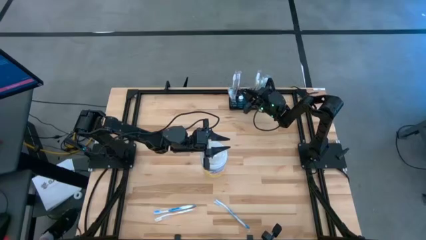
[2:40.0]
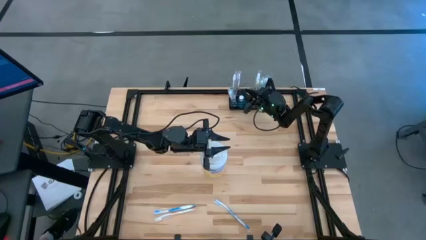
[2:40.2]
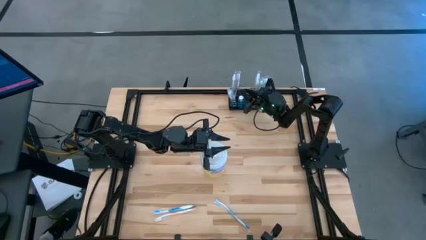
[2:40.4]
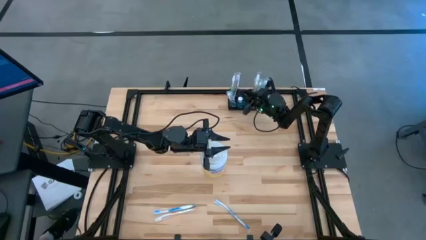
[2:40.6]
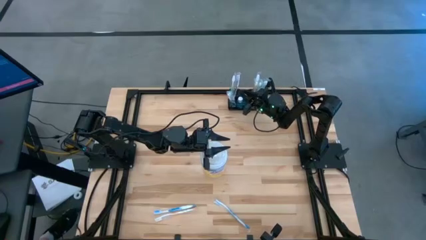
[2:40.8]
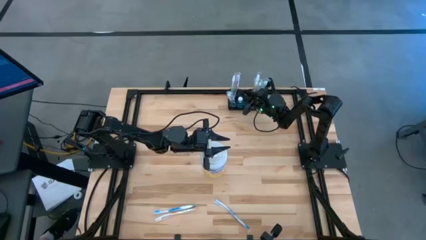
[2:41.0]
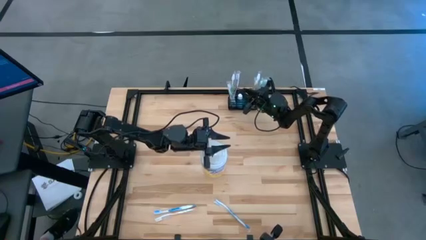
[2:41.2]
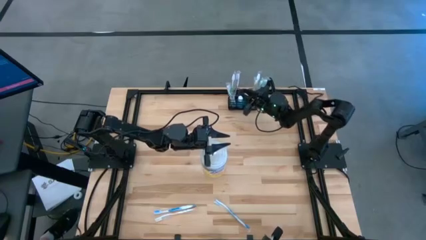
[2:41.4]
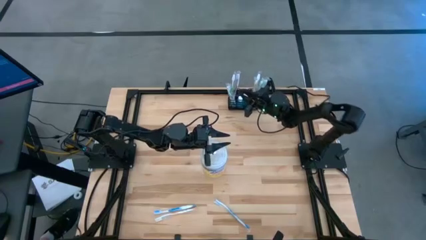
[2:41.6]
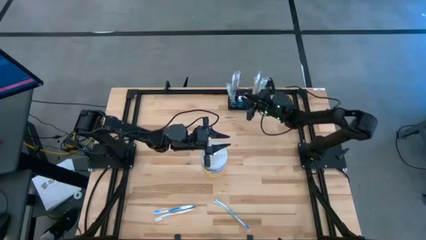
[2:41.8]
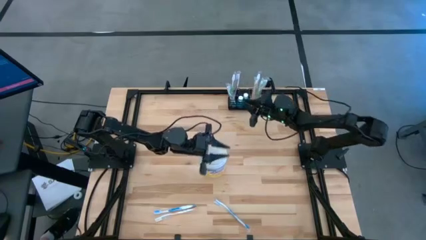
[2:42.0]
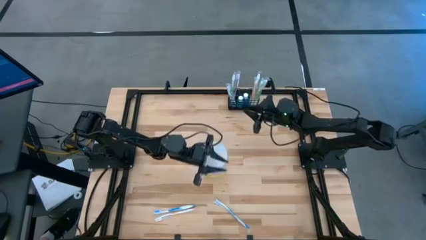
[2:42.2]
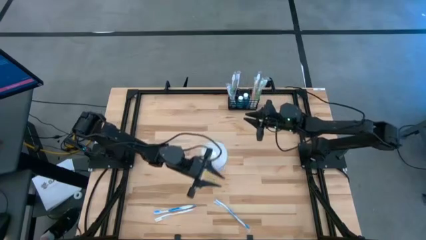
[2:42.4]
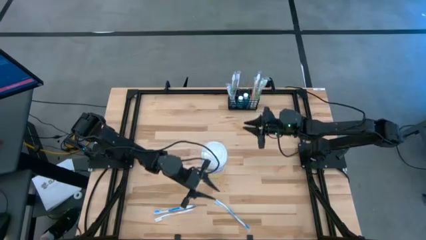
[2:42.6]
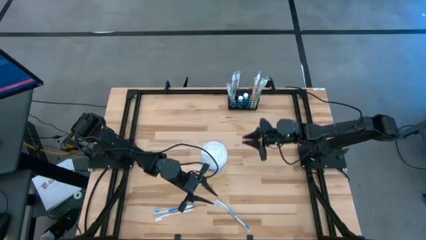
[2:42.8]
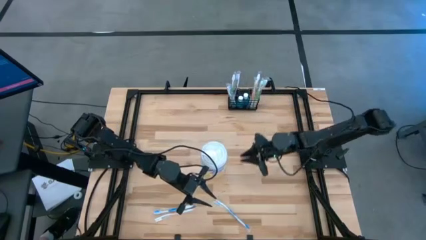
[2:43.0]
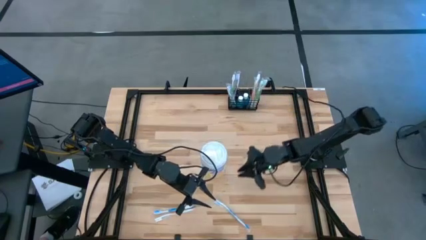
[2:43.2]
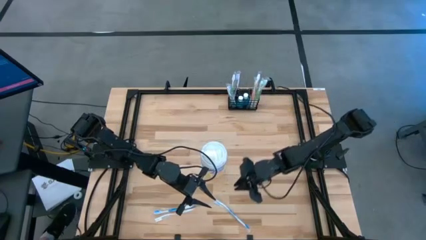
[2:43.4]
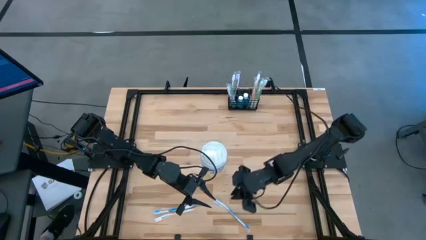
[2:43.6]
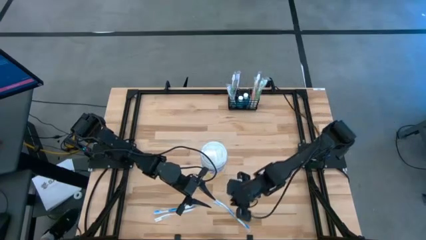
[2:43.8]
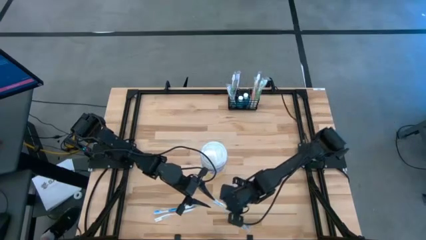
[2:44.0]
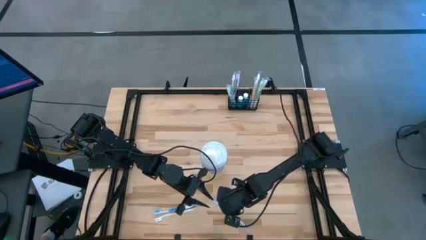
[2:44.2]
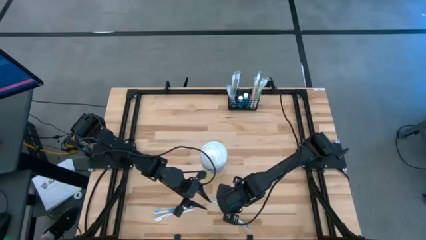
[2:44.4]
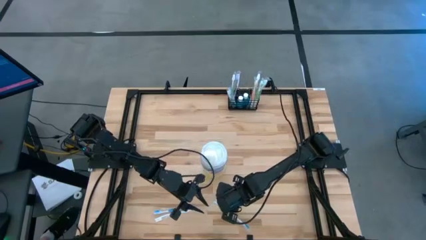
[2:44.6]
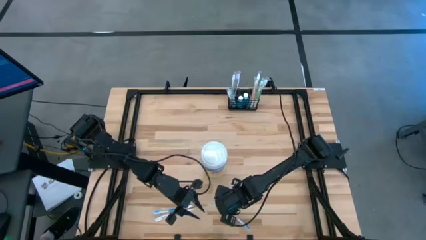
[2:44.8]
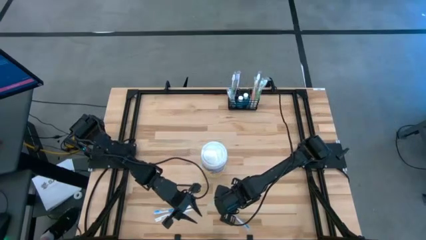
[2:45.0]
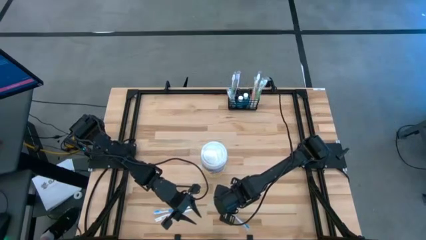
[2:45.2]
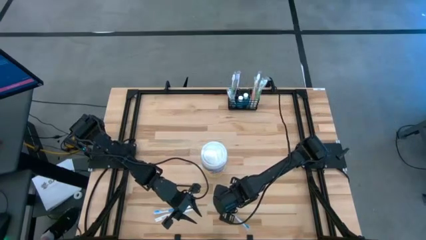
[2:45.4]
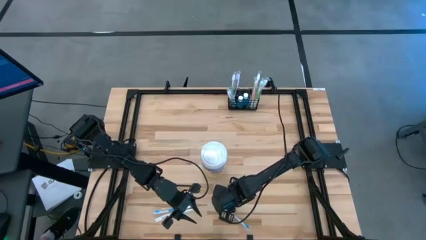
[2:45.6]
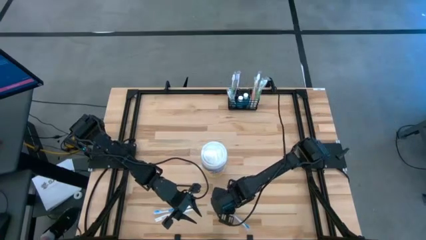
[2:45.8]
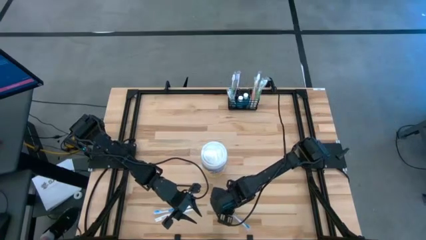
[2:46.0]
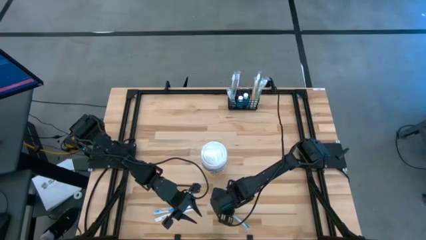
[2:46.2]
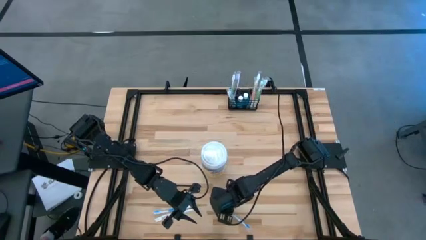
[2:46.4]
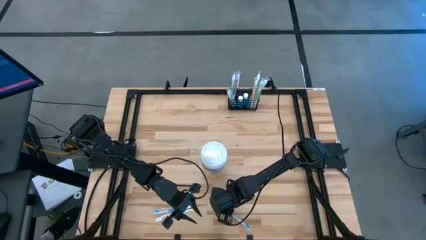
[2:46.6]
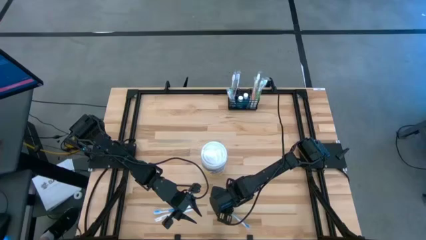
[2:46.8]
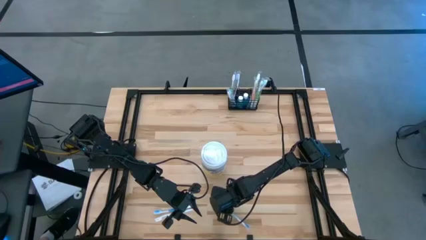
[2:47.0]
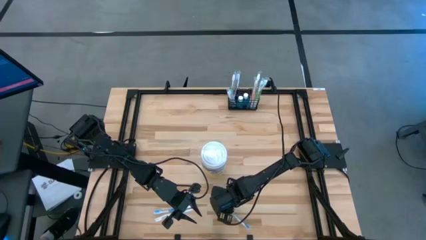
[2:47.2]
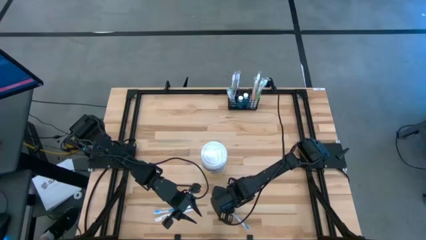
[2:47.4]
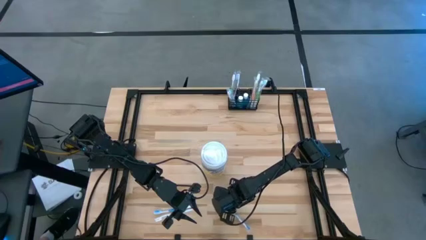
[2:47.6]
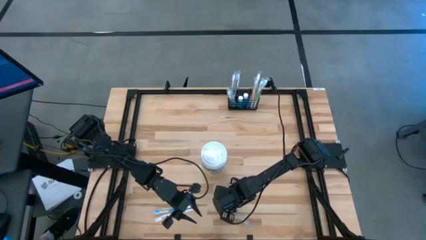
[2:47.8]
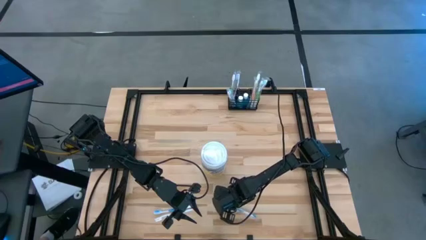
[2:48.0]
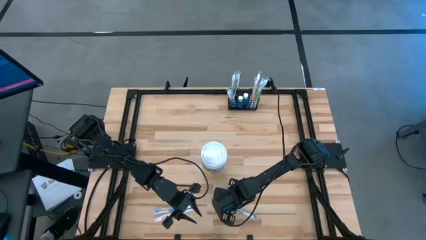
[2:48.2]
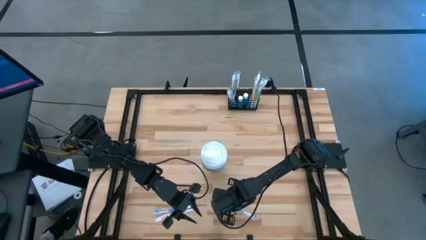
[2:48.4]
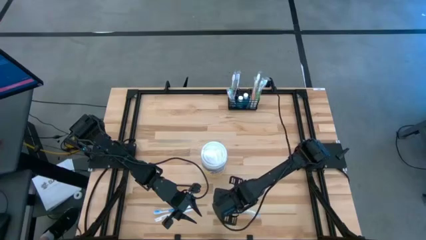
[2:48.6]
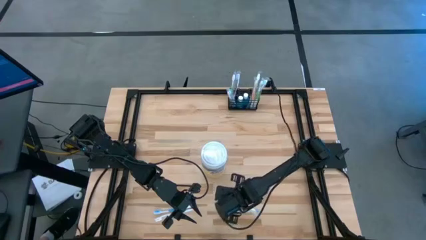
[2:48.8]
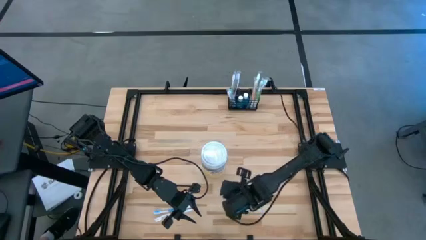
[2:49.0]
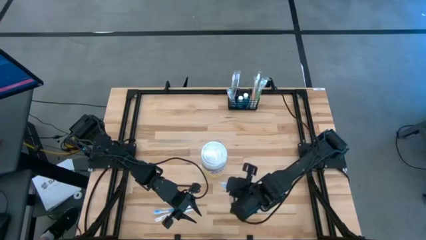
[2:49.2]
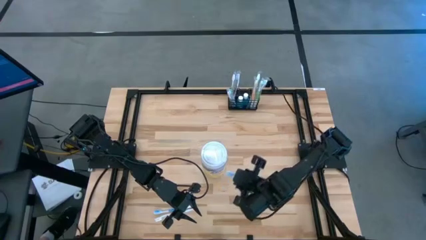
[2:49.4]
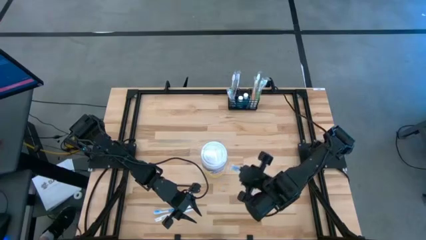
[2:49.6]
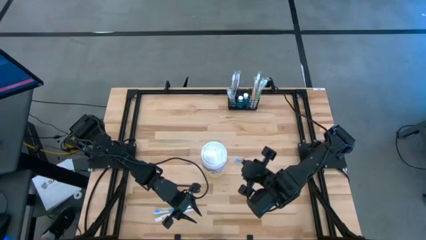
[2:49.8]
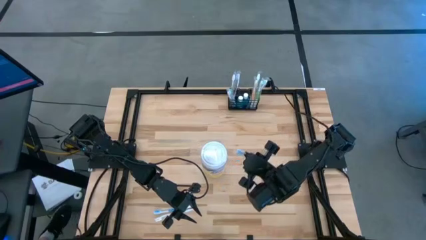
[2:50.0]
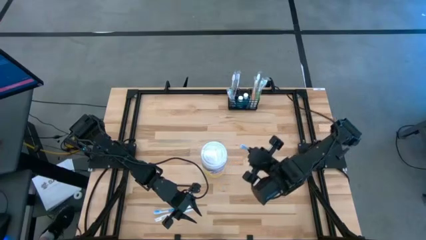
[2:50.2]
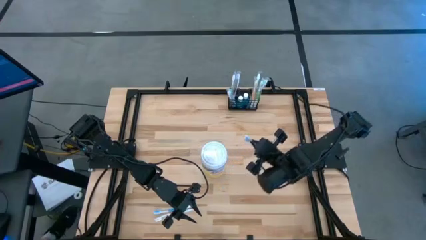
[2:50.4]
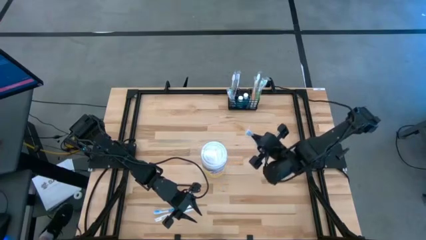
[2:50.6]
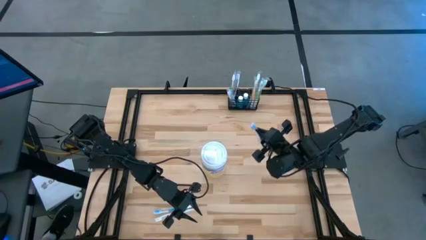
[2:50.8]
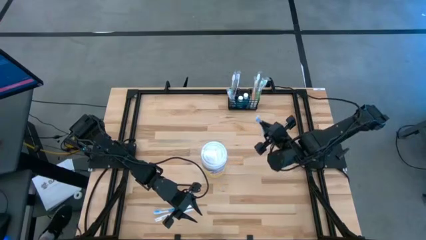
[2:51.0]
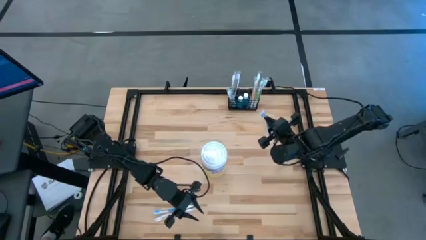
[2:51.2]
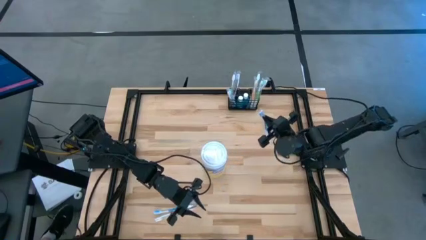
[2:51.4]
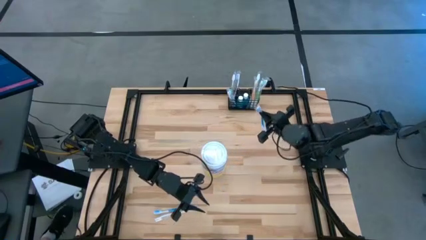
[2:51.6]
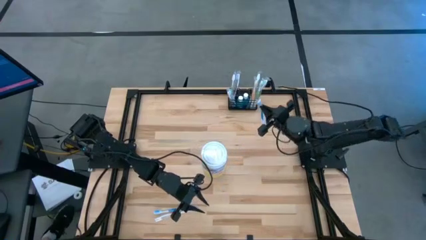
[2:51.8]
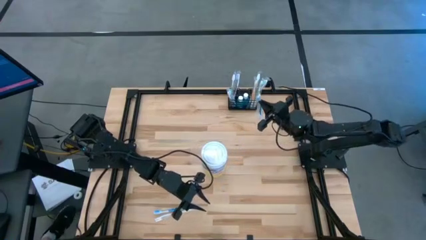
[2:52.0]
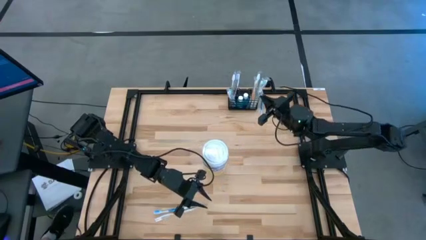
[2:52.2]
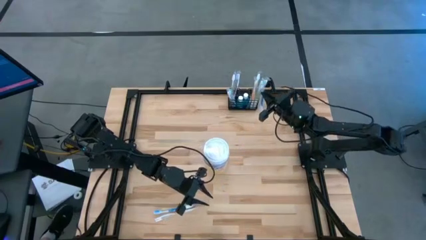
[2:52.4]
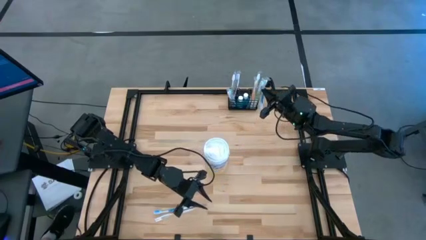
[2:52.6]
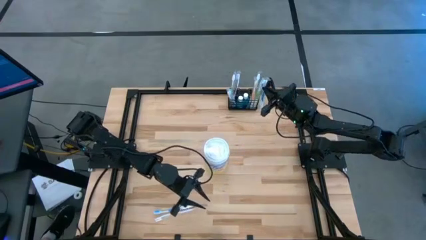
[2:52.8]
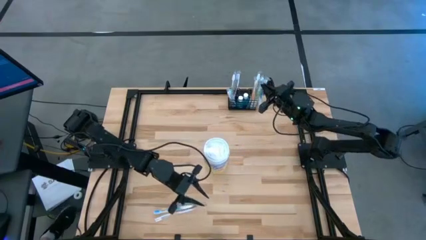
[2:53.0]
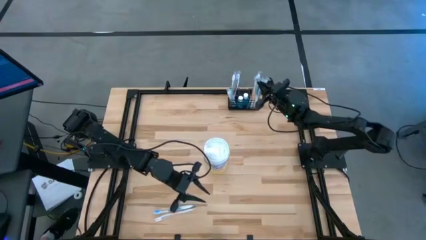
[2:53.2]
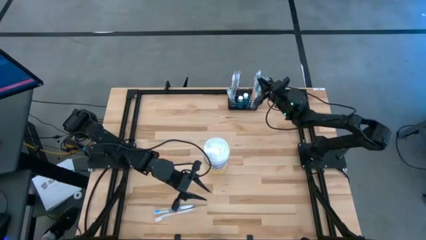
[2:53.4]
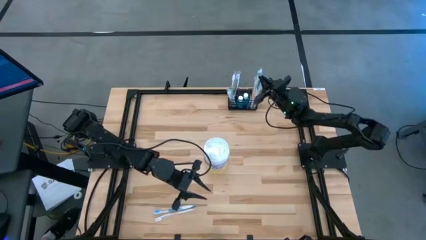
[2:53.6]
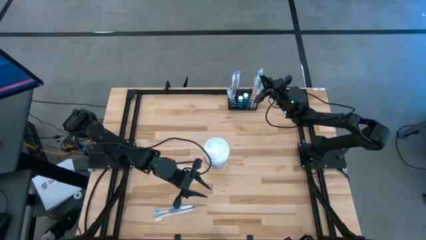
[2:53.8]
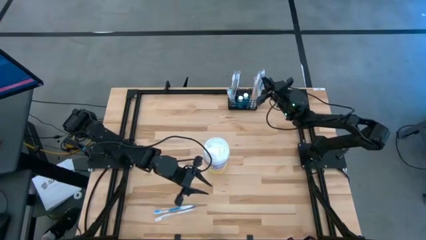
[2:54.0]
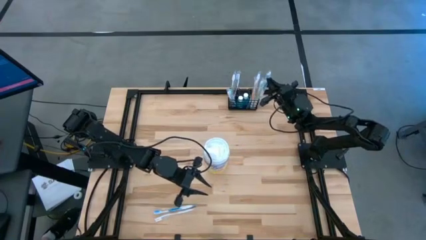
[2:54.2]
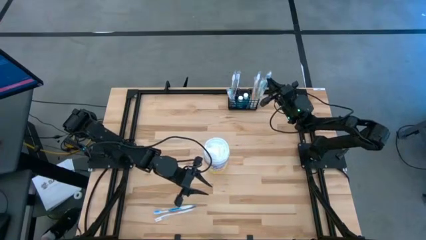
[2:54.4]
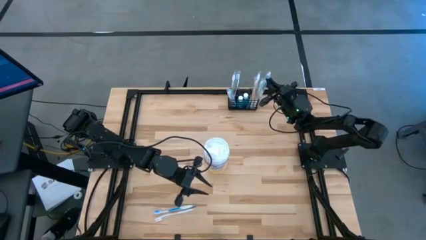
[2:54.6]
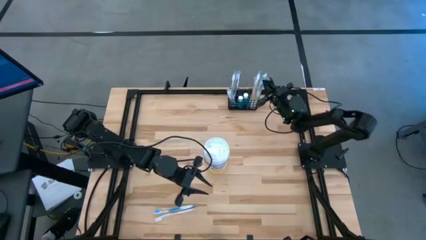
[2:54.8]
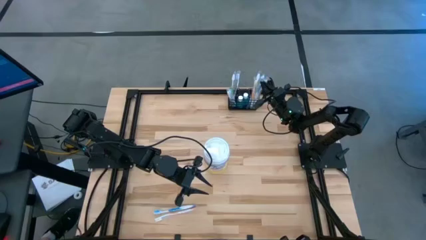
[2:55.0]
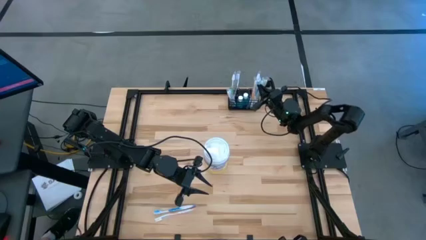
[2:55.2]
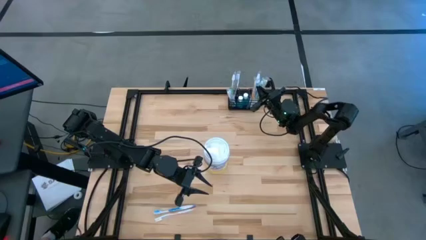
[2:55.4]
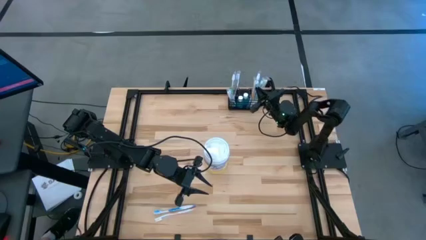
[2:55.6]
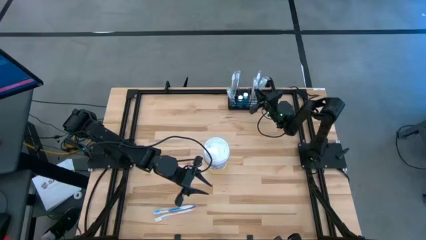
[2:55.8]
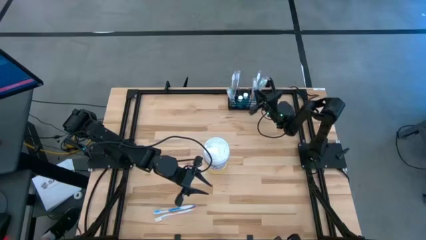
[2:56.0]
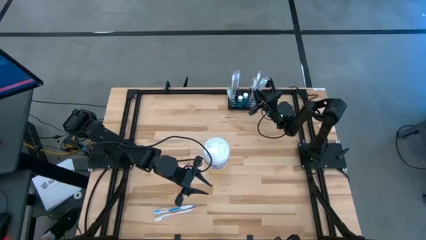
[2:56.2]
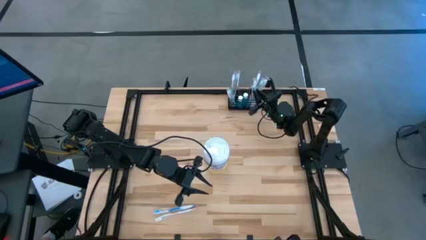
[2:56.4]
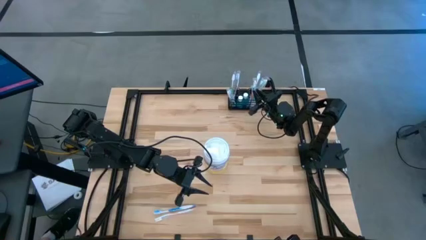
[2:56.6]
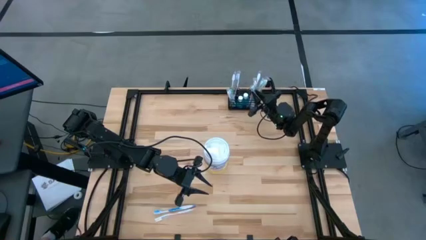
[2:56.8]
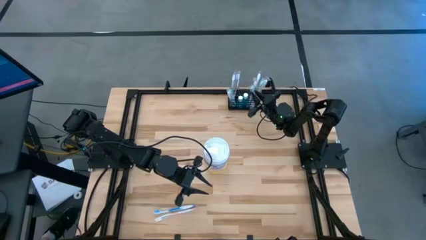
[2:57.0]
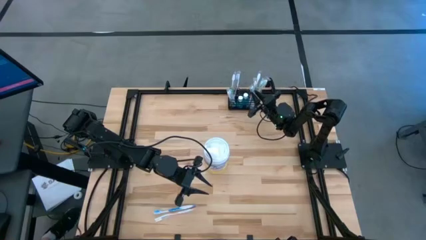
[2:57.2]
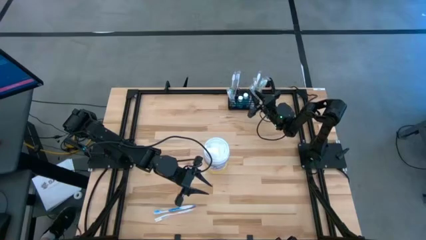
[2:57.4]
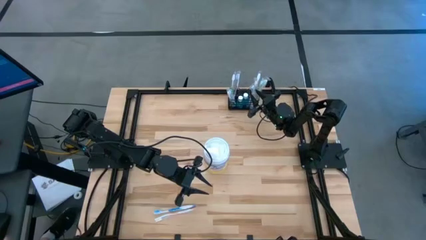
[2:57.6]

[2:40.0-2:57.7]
Task: Pick & Place toothbrushing station
Put the right blue toothbrush into the black mesh organizer
